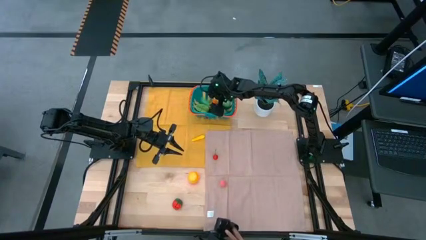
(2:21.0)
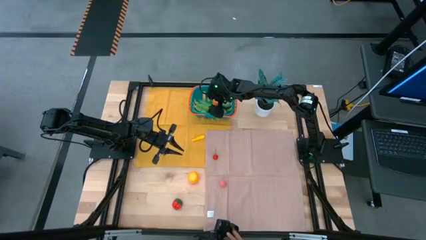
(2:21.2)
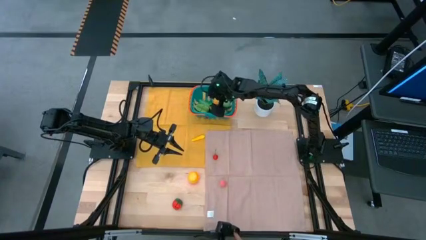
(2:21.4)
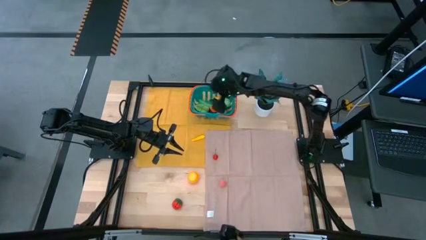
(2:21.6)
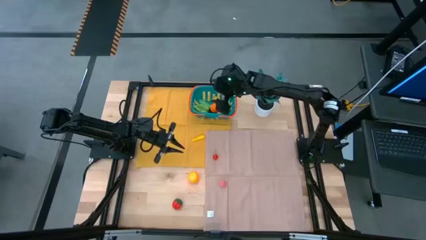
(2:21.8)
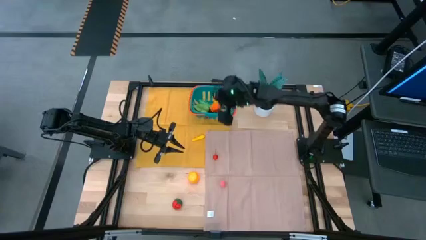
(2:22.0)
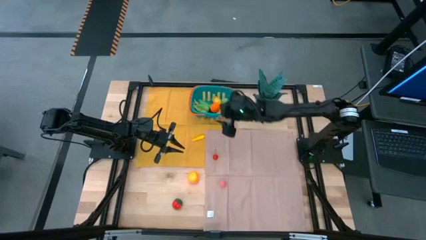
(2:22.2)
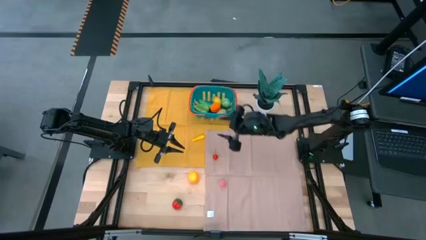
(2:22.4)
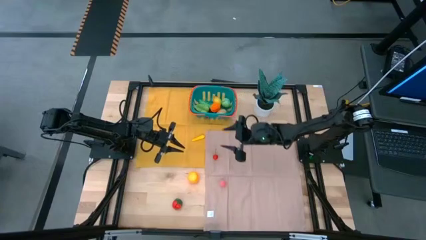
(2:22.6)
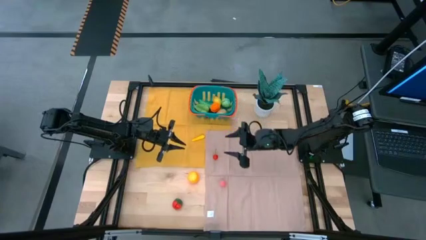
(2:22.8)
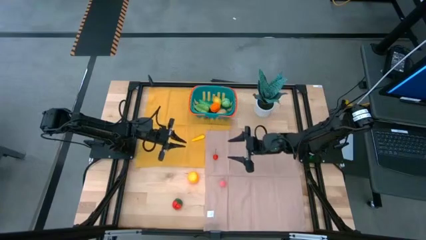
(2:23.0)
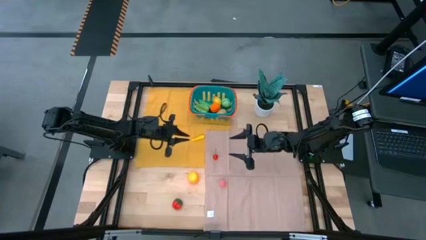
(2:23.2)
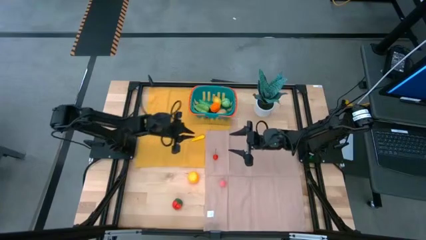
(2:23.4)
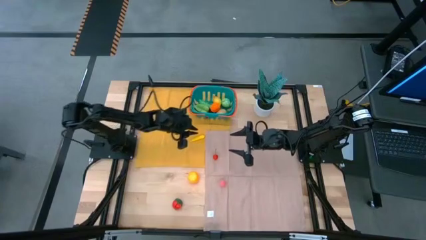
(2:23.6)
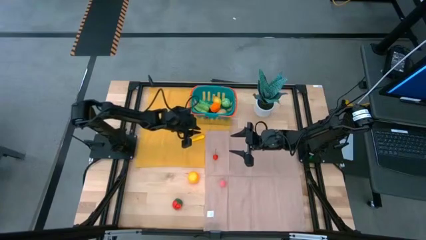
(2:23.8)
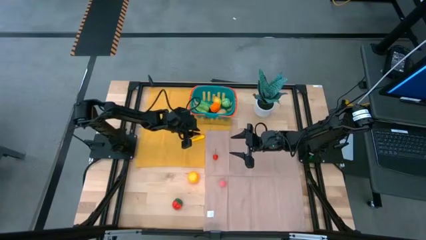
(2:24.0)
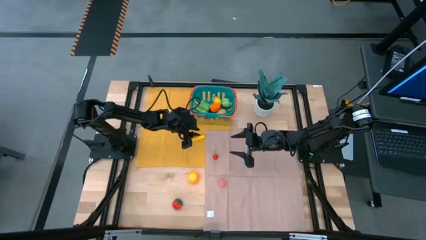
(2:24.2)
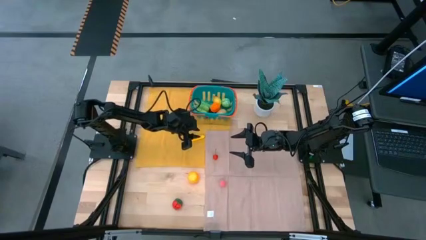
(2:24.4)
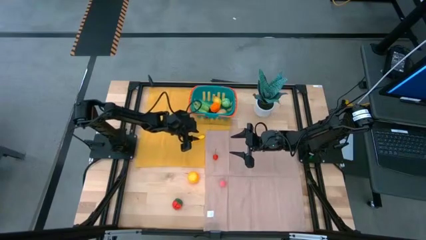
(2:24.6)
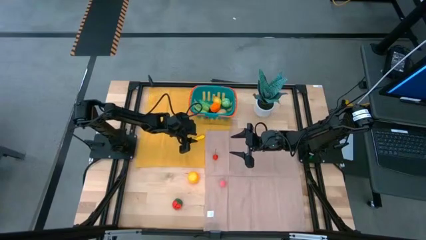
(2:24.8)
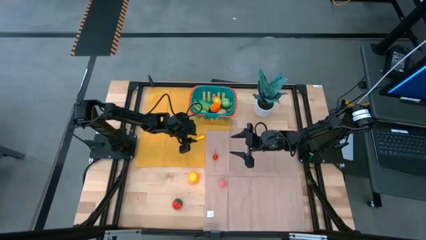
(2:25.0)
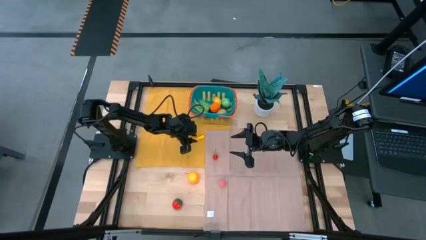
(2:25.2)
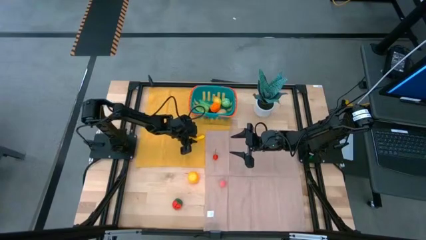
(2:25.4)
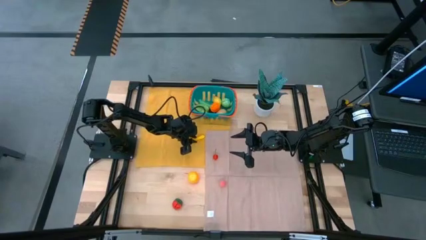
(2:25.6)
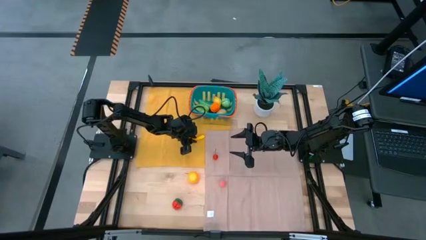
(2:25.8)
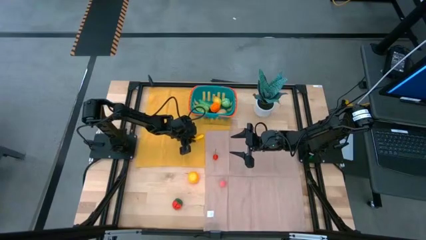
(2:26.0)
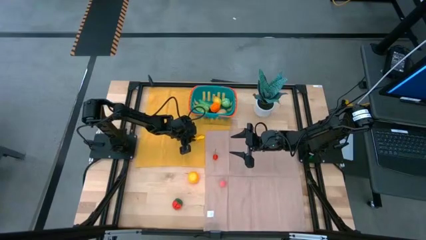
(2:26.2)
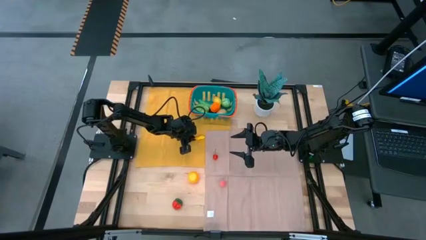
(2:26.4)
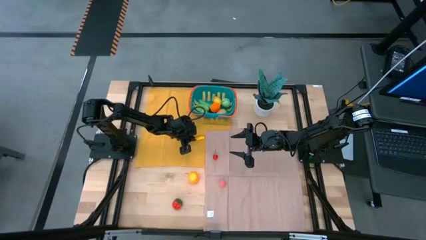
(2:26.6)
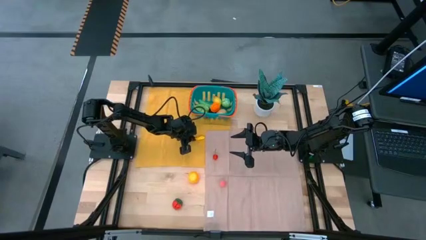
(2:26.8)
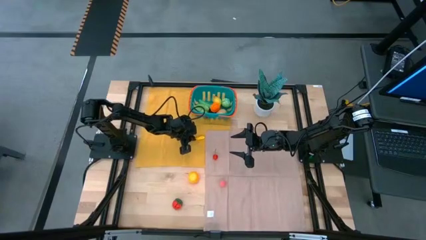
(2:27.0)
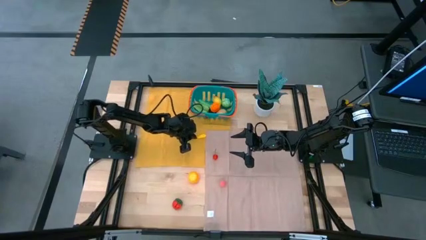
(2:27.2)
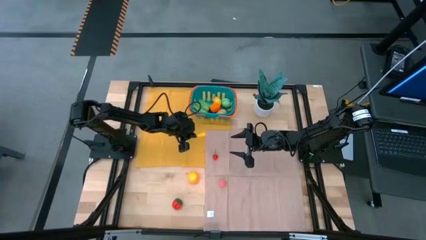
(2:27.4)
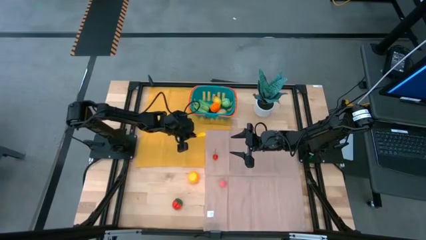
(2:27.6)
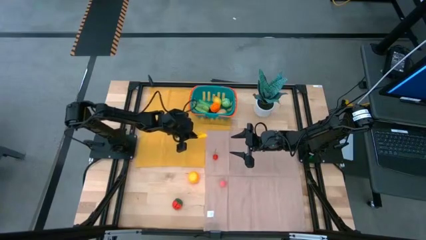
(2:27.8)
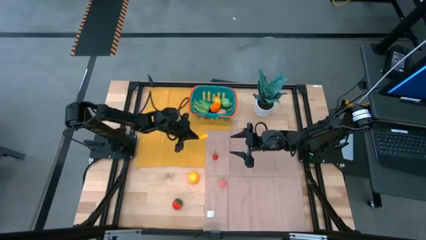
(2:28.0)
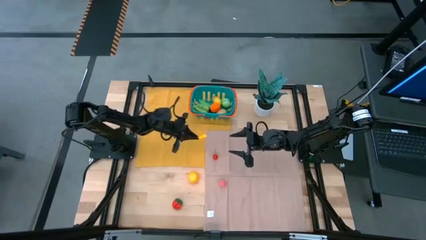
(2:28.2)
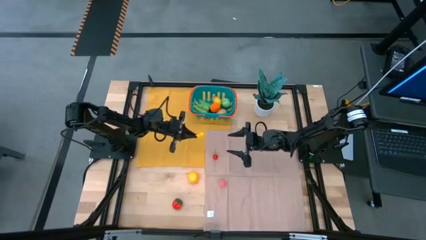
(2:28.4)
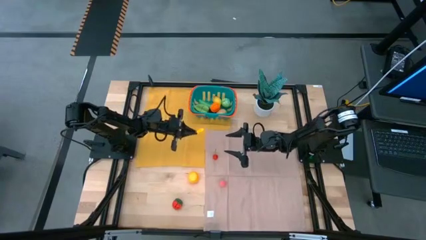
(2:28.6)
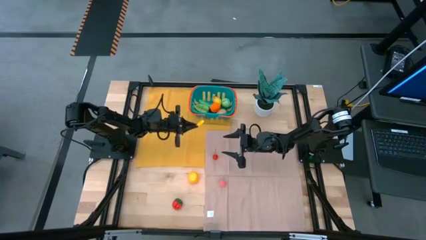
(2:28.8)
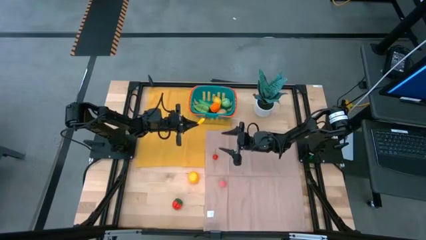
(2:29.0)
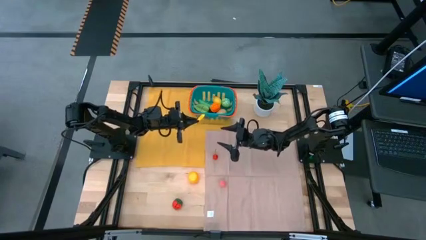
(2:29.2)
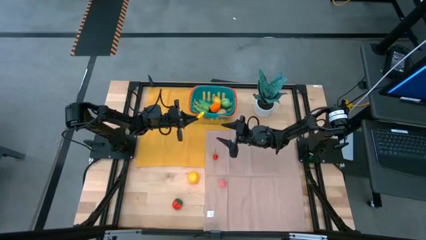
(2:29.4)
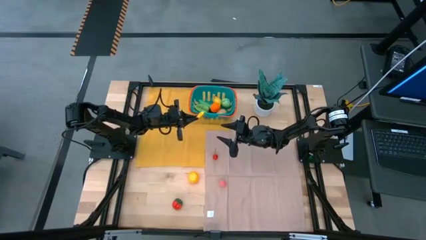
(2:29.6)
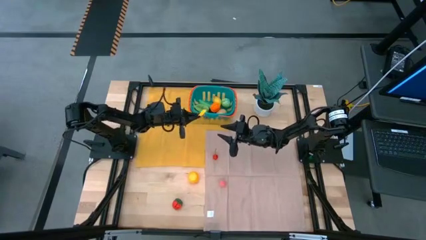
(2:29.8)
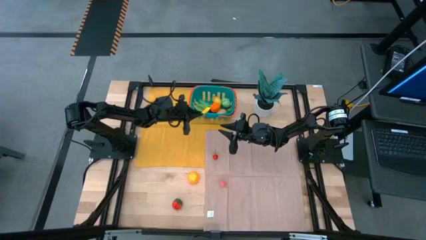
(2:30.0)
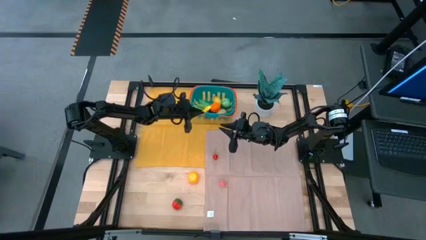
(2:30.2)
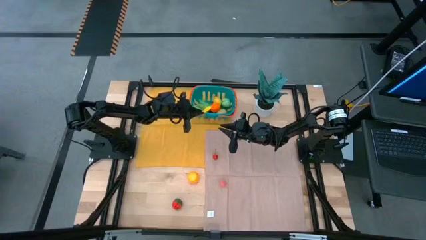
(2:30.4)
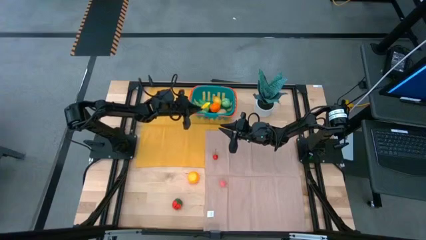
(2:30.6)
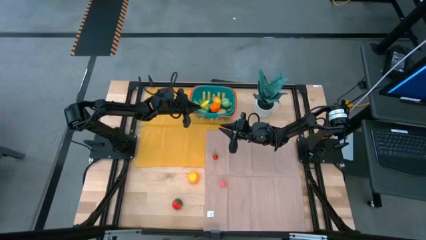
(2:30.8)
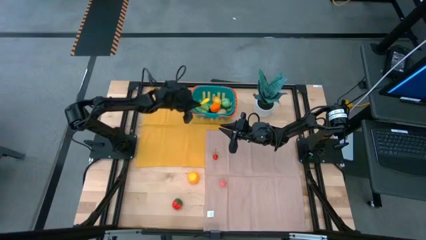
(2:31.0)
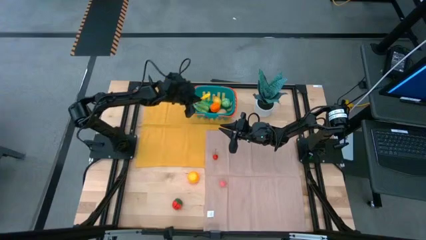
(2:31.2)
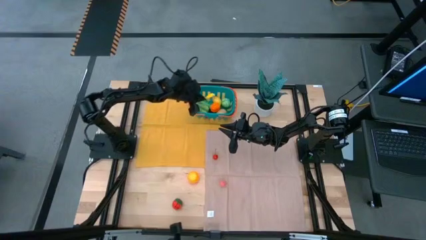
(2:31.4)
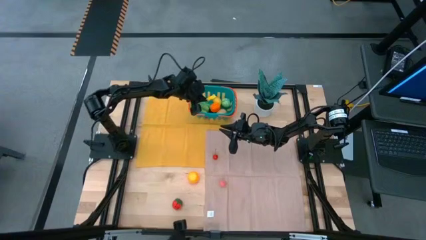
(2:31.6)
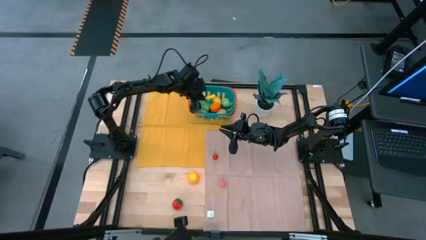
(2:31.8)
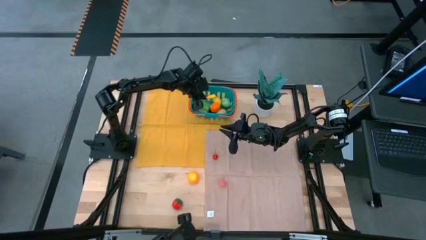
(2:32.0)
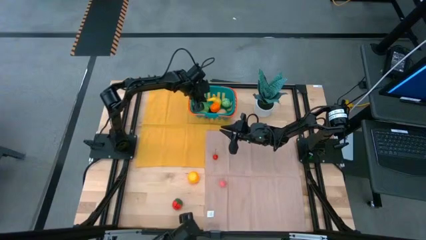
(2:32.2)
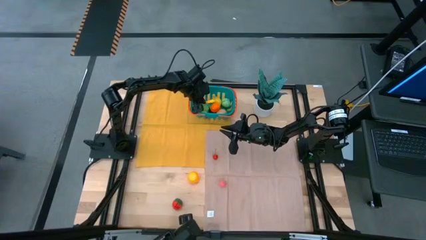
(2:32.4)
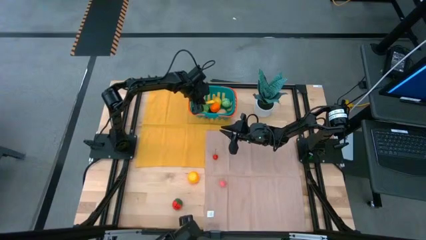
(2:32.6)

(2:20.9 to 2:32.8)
Task: Pick and placing Produce into tupperware
Put the yellow corn into the blue basket

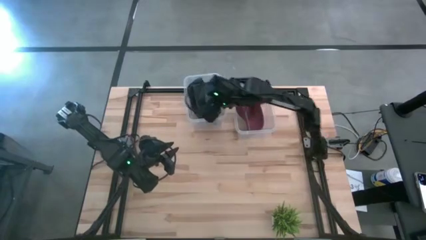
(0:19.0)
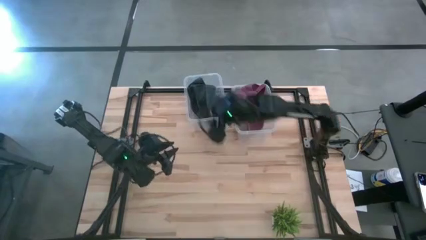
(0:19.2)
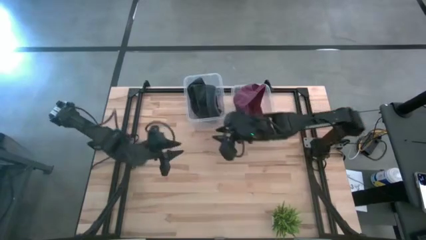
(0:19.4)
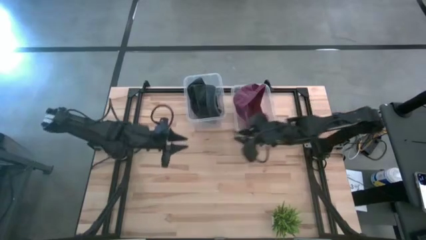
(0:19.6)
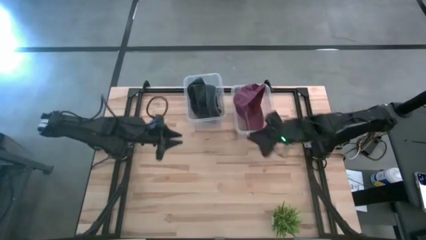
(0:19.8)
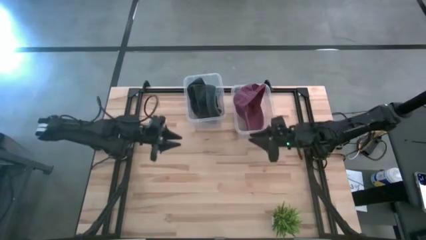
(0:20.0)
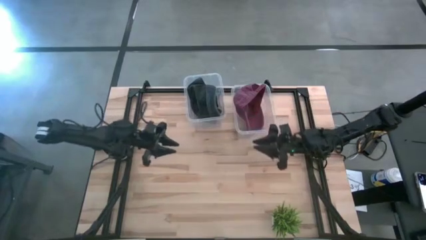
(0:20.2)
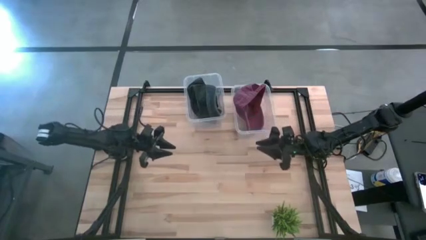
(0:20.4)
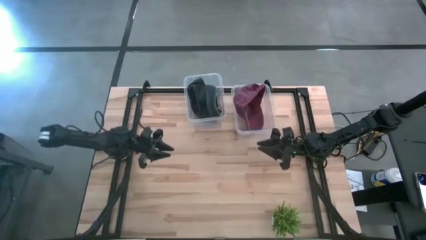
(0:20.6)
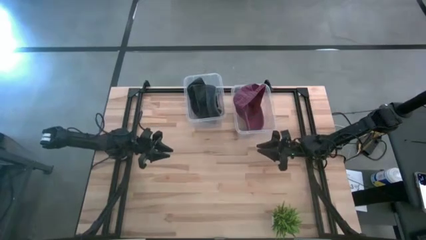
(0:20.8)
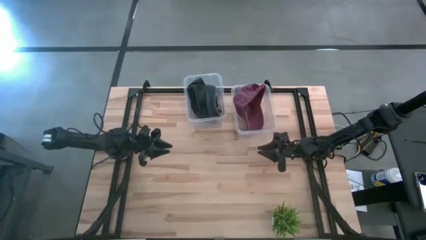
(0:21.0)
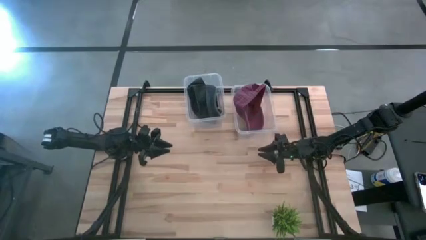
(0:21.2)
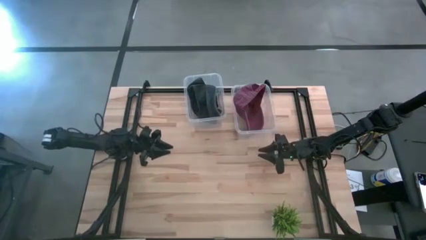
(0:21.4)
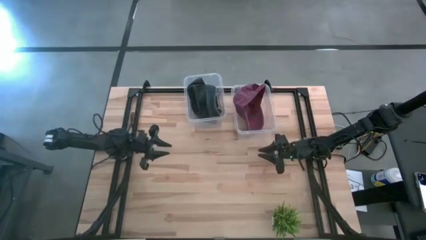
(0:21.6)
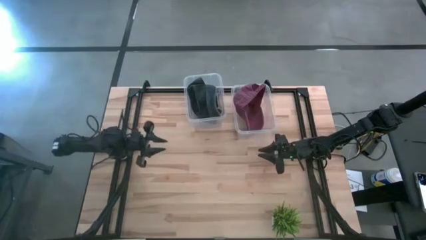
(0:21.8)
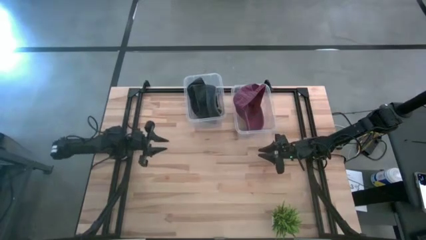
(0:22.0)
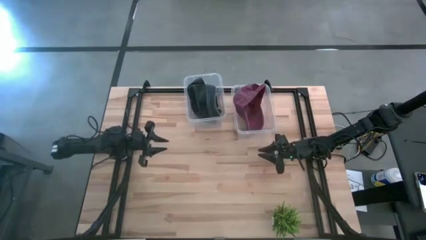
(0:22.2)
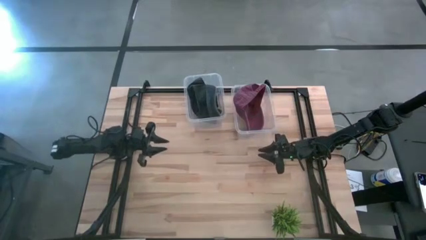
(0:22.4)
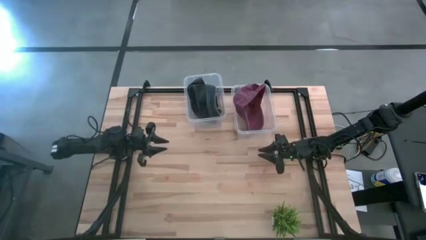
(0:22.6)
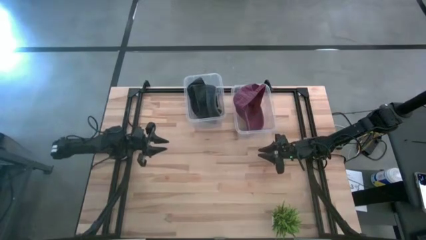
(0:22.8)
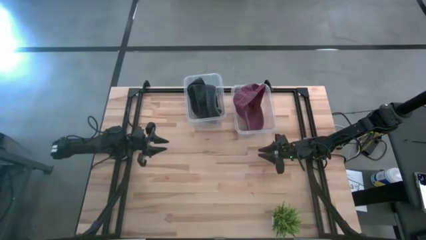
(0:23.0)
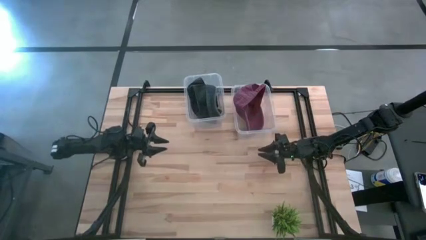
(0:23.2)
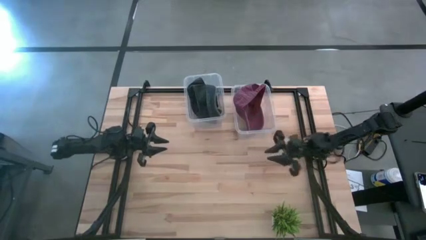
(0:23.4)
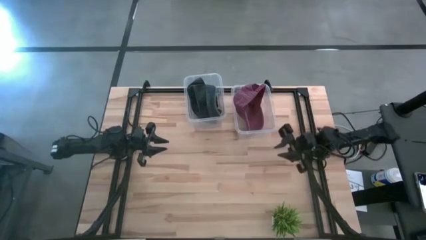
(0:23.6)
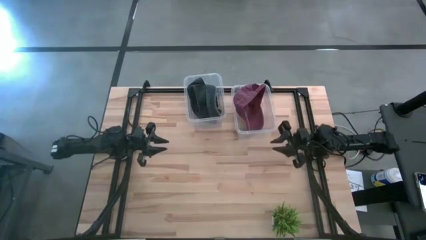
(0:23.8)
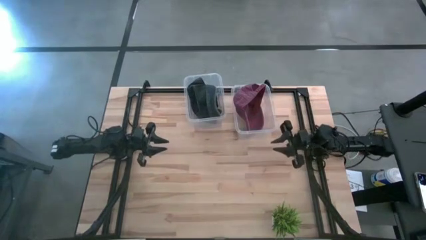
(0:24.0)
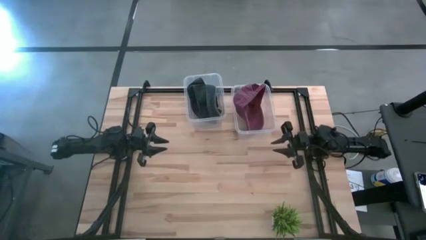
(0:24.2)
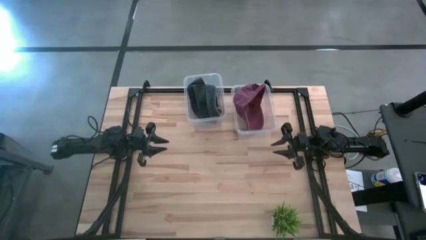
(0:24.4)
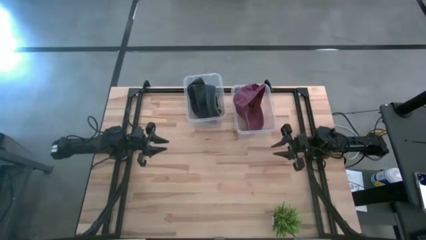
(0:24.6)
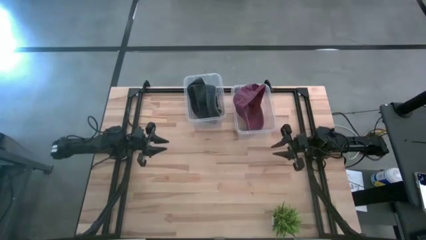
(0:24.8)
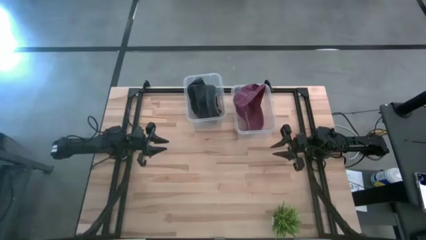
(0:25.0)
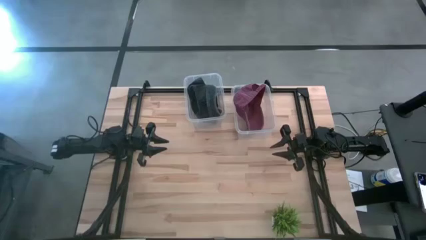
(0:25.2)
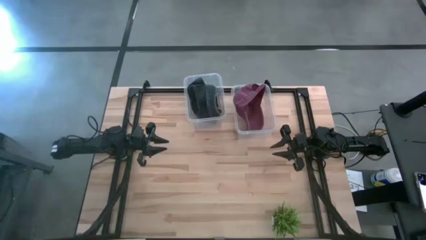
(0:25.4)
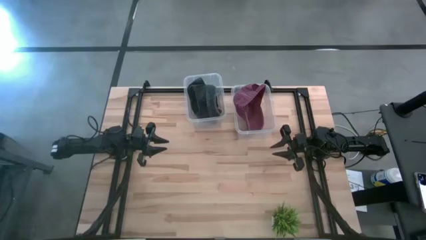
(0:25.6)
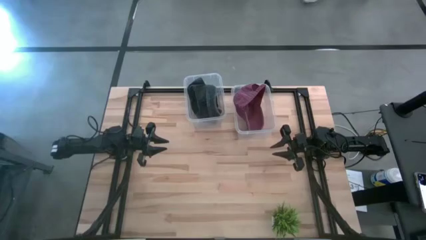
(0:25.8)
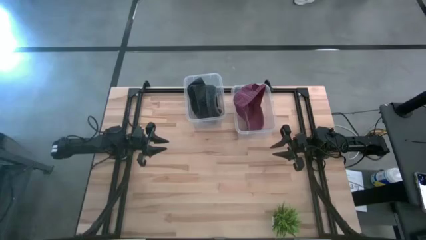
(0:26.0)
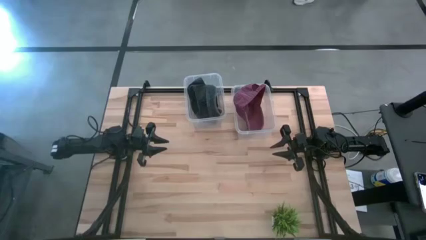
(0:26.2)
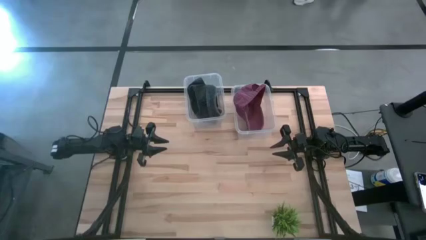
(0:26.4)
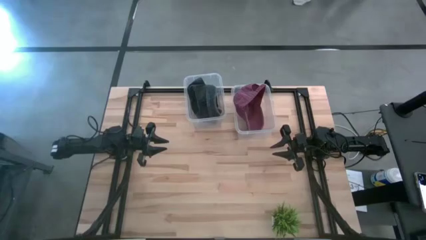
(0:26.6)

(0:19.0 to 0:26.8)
Task: Pick & Place hat
Return to Home Position
